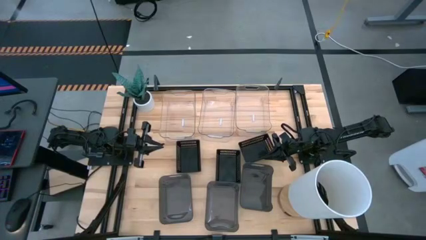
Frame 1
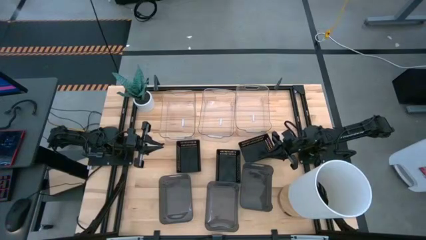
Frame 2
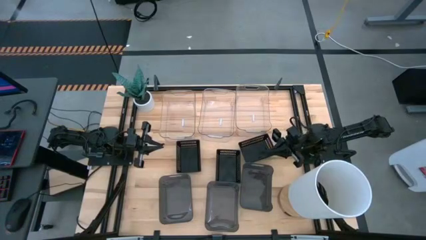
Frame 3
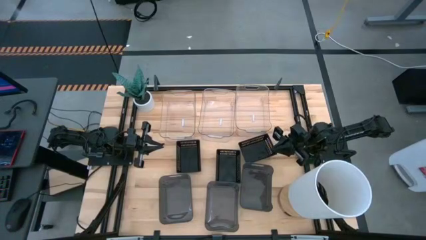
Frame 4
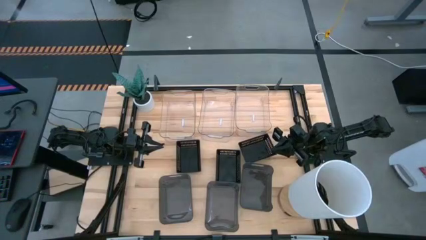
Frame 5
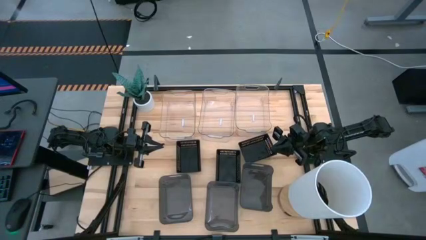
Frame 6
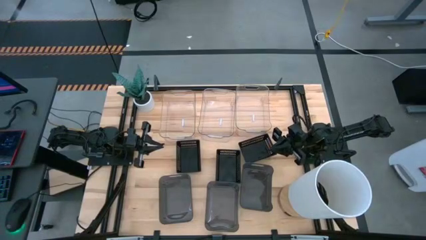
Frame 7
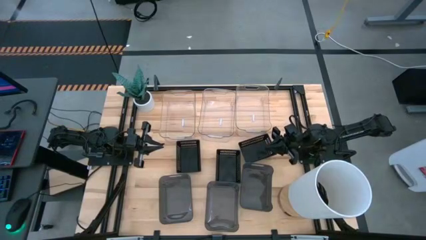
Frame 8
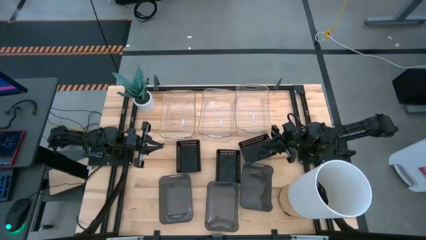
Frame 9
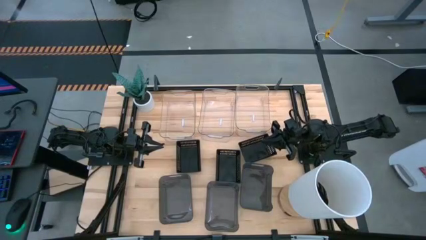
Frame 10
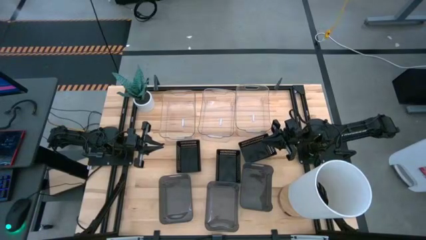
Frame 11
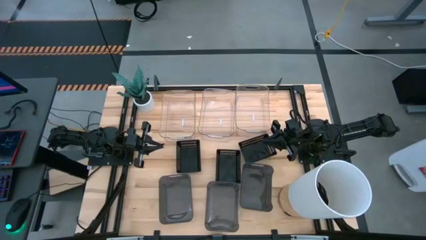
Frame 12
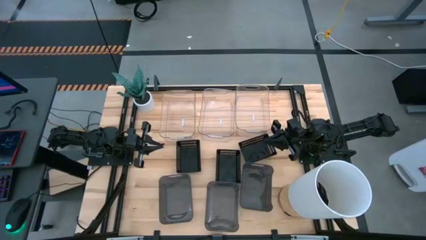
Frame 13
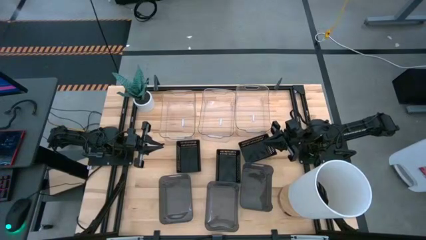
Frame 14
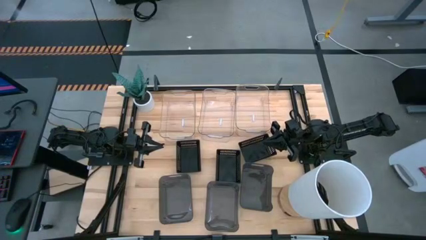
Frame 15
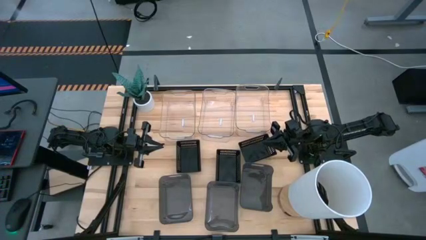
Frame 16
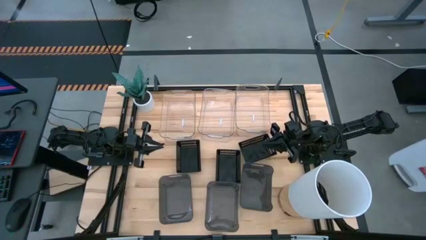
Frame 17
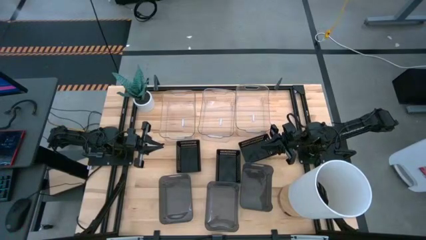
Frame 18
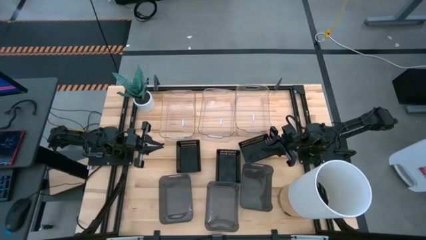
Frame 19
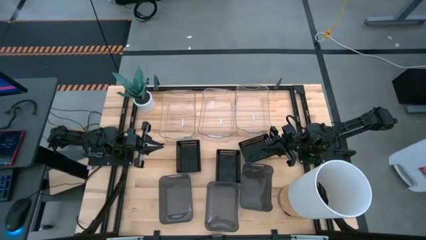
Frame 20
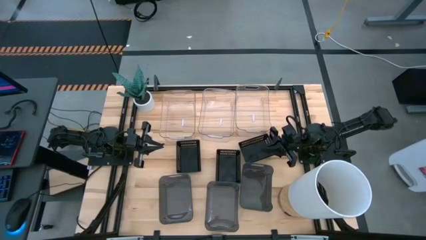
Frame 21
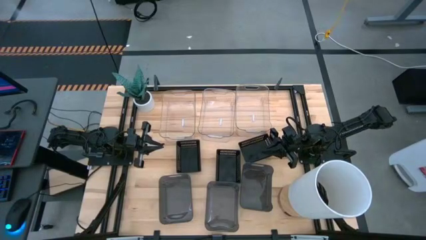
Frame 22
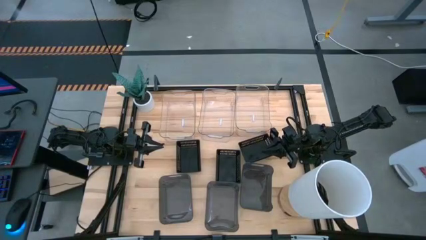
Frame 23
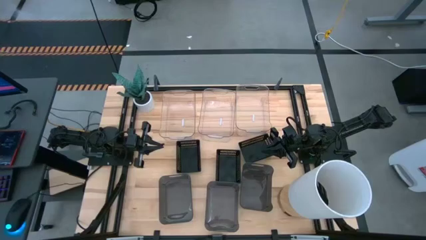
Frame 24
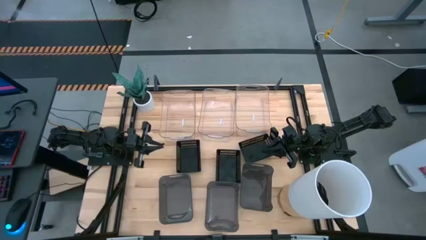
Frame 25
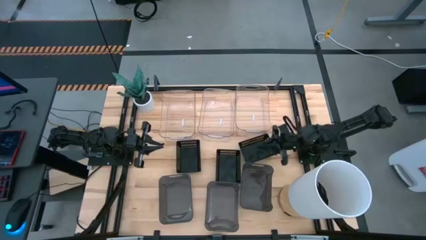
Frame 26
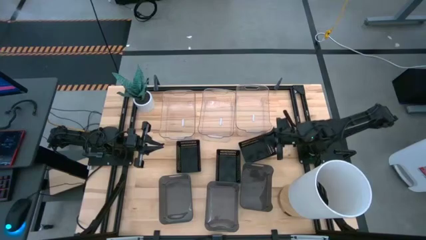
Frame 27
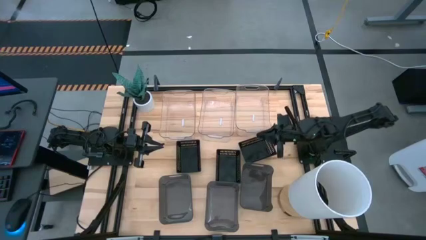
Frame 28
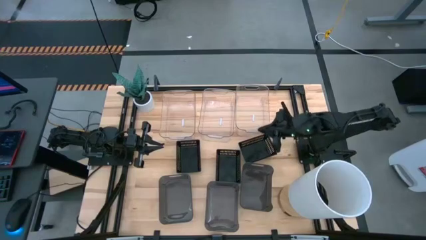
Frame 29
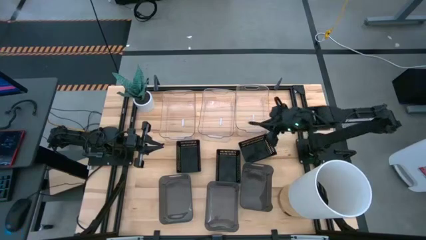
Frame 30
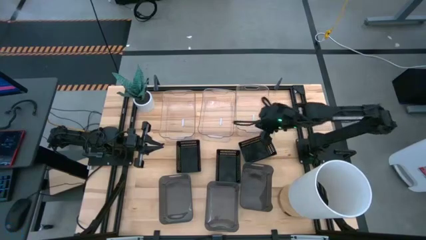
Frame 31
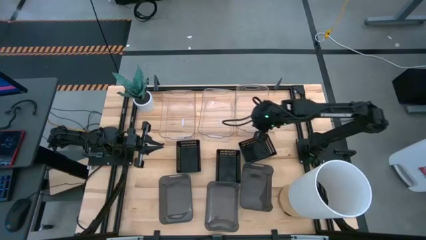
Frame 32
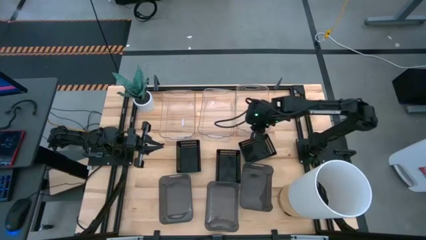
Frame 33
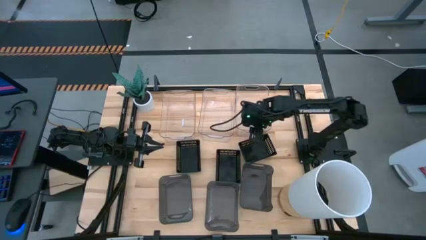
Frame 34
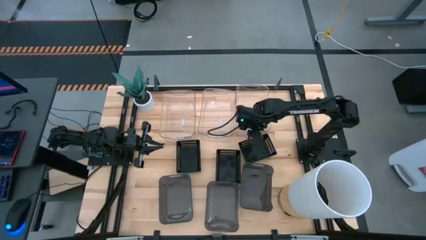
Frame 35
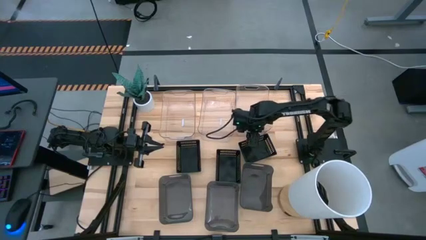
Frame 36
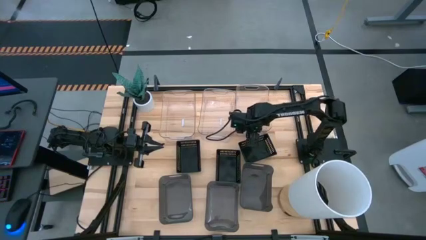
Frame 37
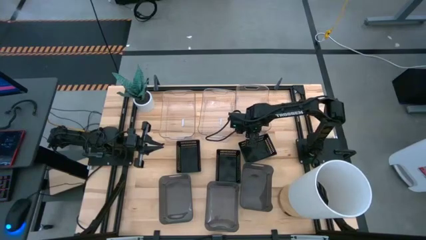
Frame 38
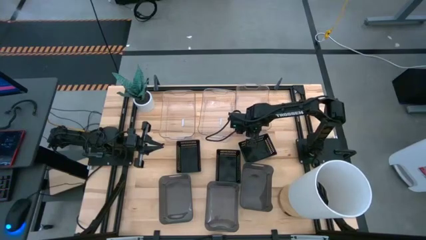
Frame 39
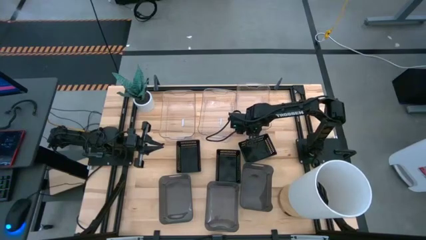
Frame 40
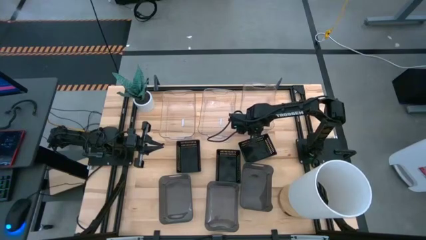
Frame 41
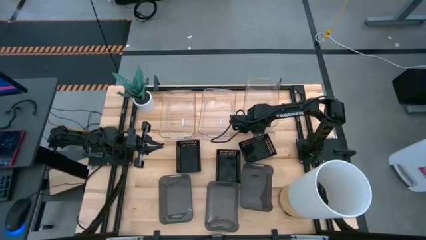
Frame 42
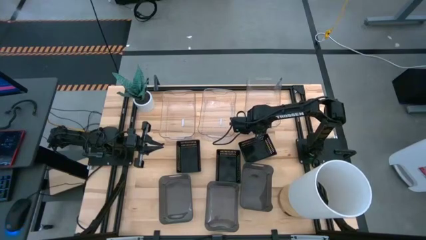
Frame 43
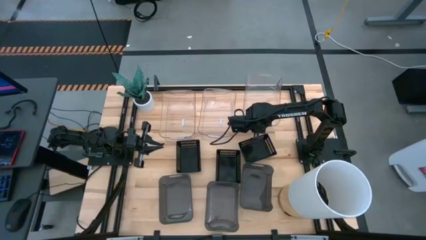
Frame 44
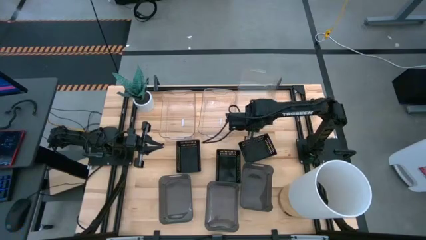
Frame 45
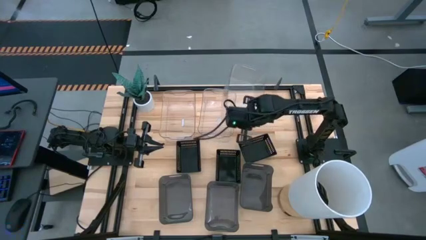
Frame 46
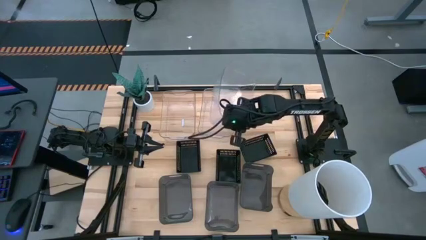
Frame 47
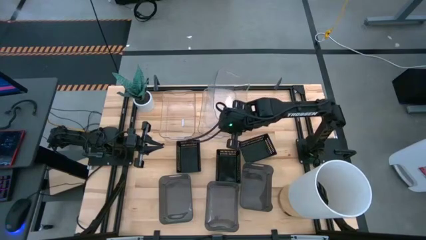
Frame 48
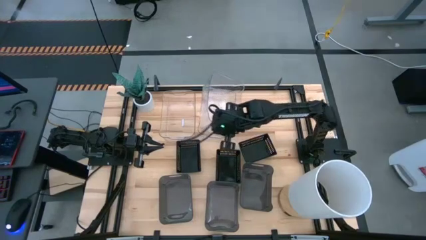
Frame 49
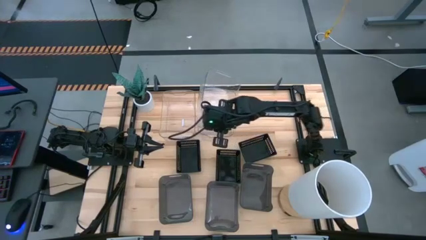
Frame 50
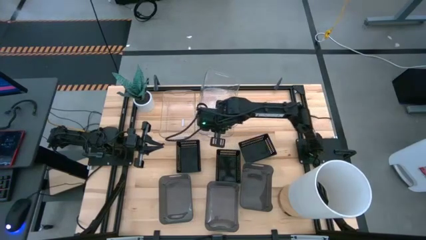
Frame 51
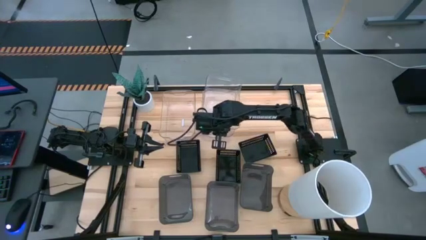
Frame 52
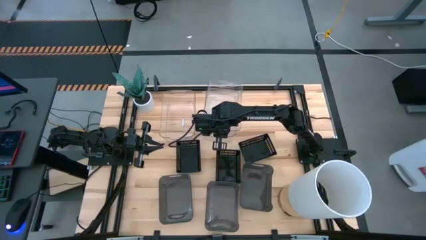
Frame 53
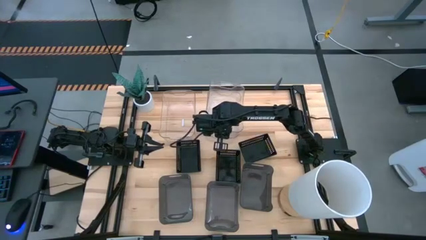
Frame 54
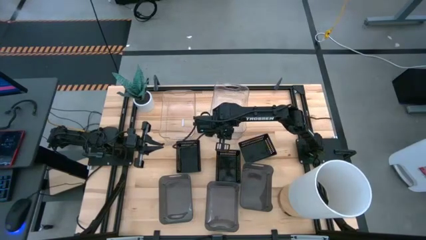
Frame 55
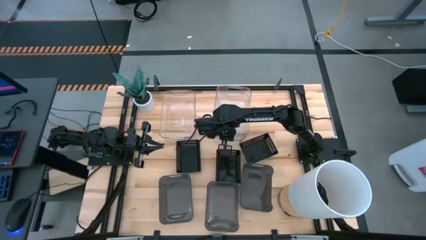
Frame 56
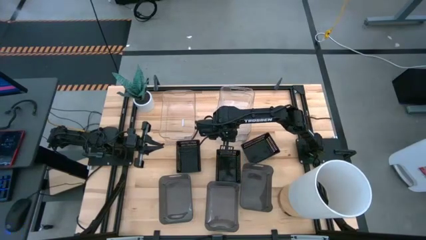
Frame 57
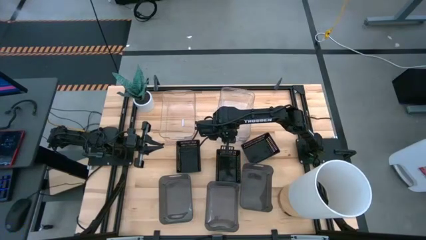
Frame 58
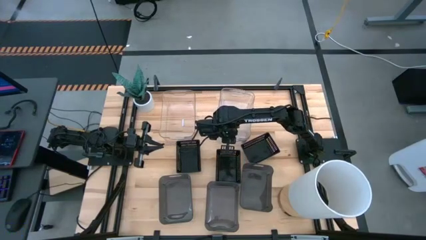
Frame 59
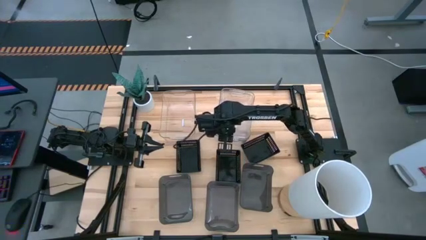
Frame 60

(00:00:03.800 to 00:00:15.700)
Stack the right transparent bin on top of the middle transparent bin

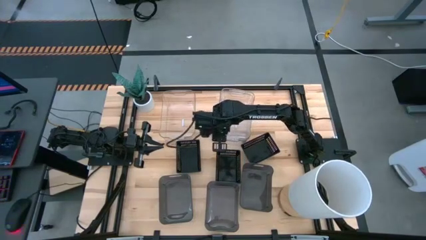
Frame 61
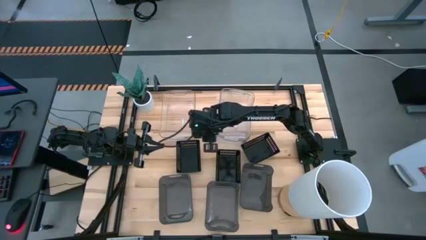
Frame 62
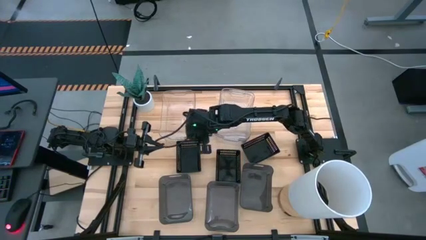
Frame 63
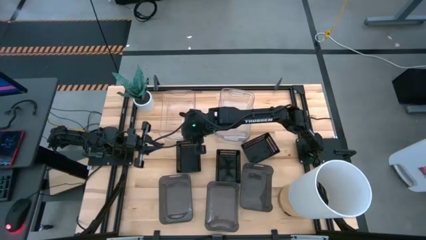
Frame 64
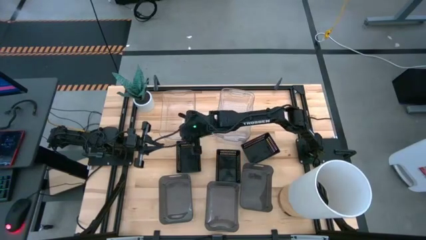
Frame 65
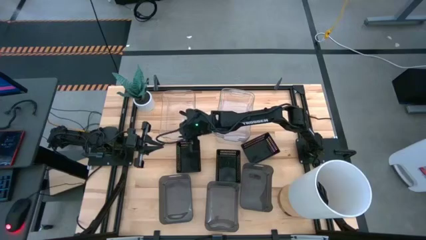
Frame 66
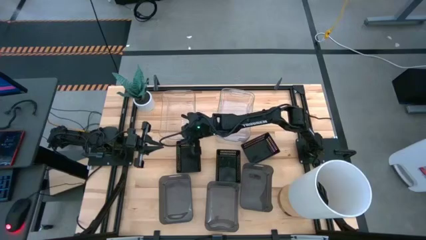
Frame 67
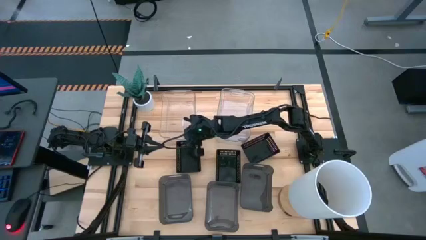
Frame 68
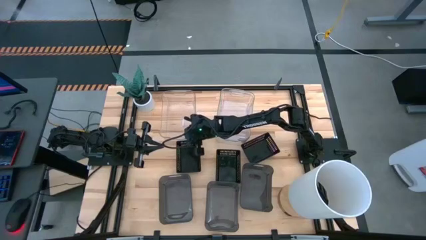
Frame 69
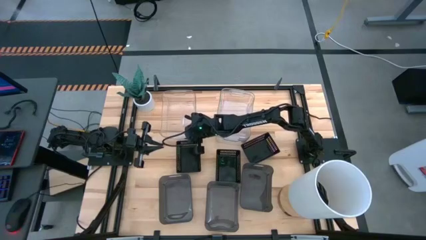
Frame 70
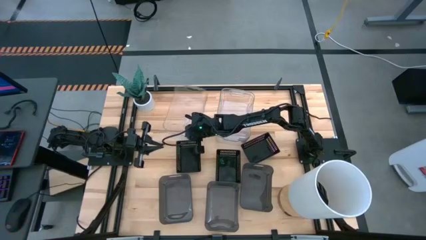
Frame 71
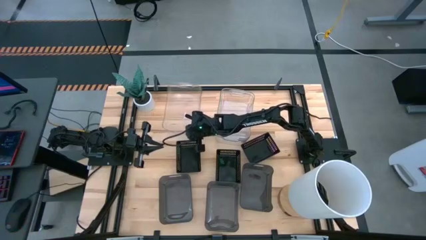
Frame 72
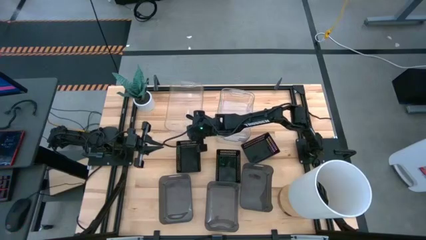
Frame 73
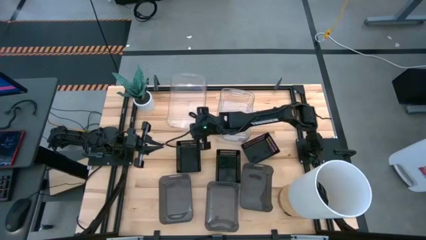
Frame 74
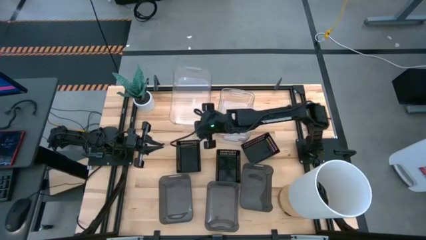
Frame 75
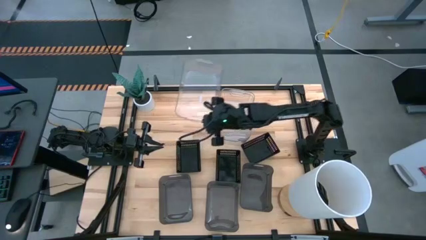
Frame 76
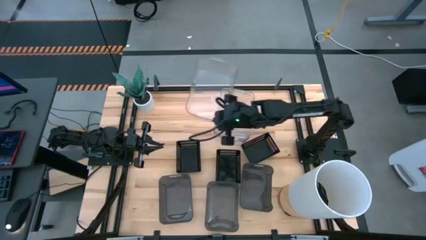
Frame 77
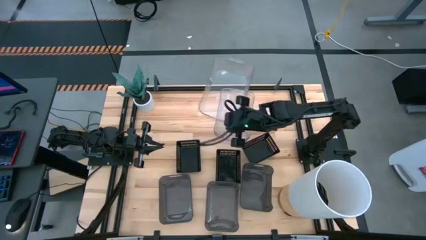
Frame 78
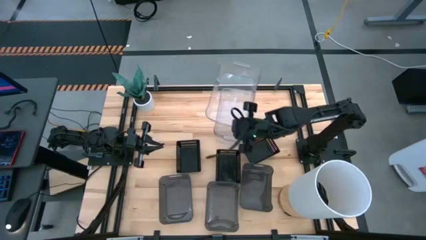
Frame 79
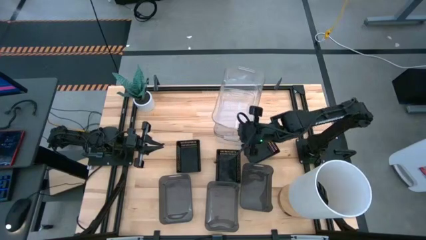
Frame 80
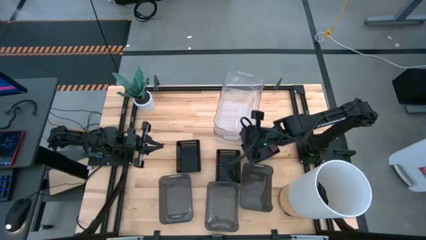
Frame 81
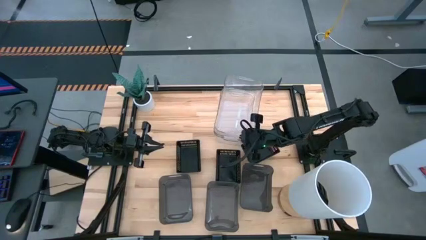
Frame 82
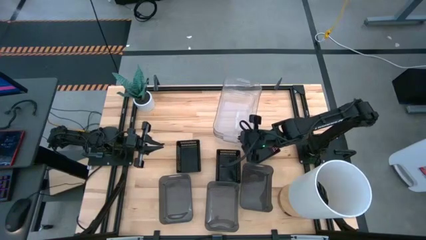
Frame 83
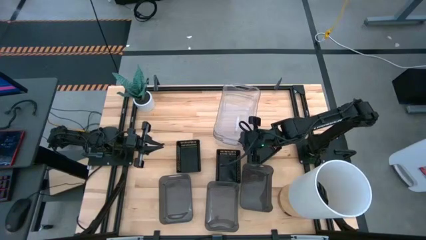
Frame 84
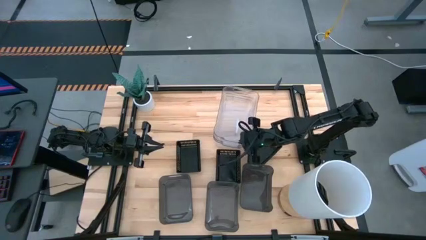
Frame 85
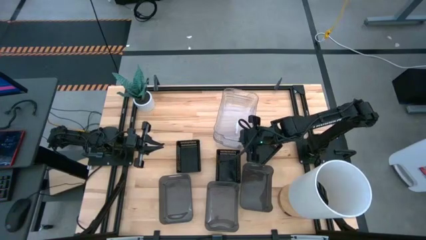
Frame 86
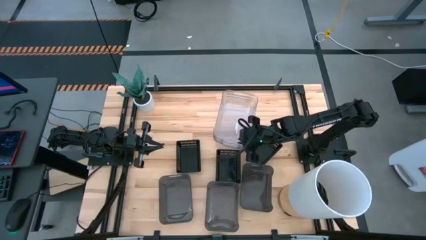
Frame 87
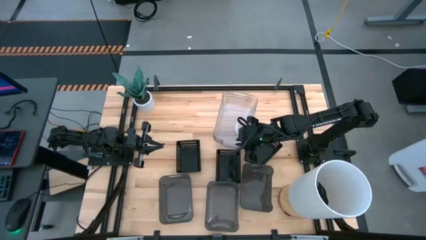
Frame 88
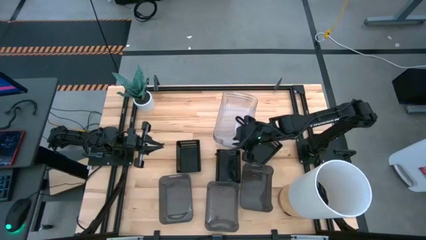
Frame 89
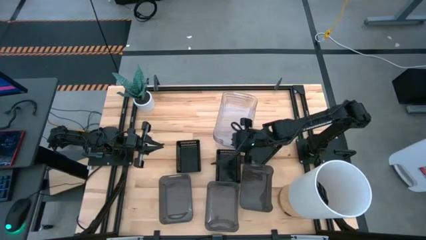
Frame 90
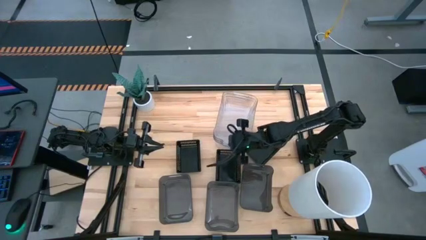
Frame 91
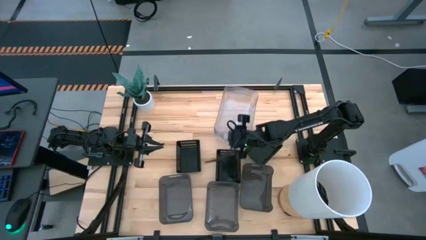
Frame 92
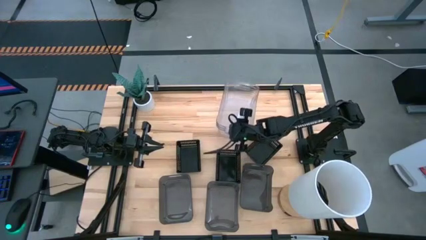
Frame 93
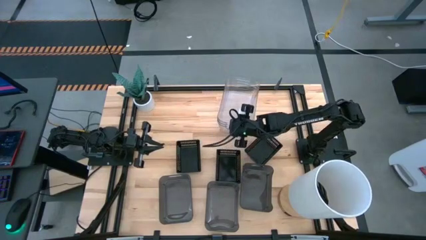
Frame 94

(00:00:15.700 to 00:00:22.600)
Stack the left transparent bin on top of the middle transparent bin
